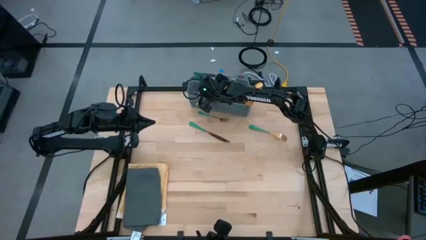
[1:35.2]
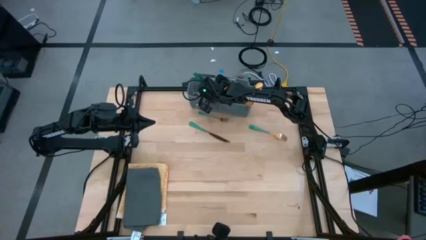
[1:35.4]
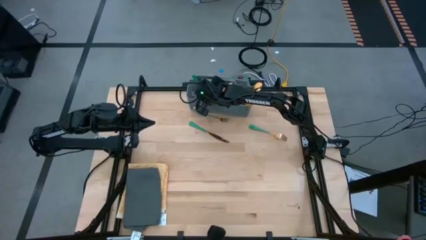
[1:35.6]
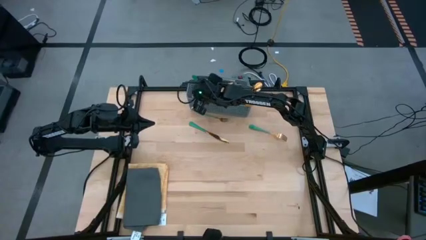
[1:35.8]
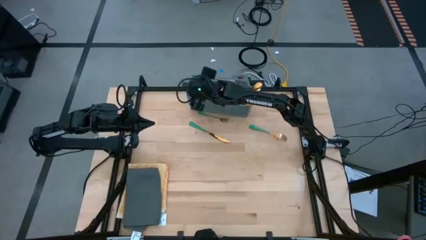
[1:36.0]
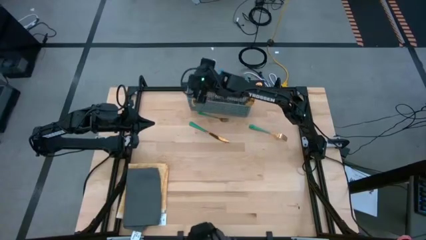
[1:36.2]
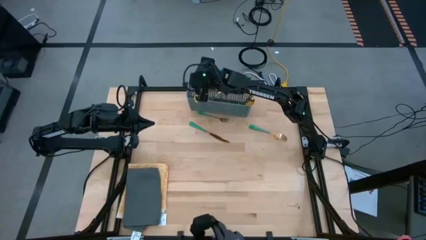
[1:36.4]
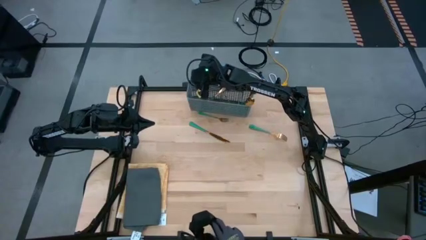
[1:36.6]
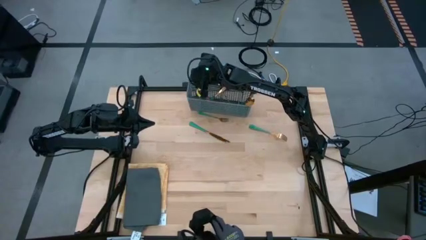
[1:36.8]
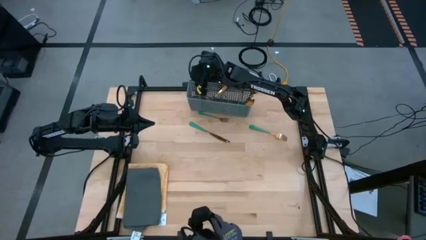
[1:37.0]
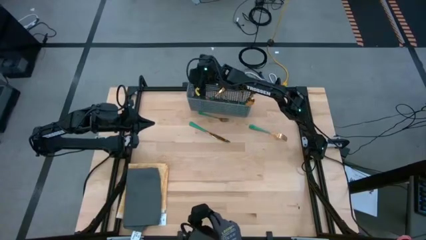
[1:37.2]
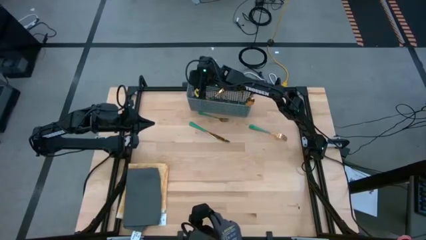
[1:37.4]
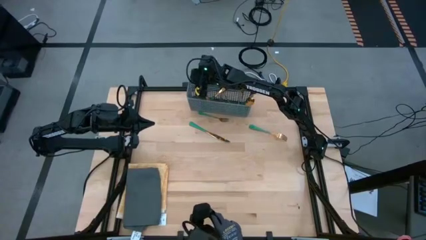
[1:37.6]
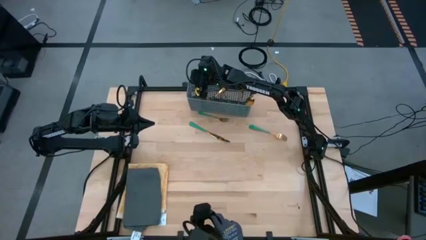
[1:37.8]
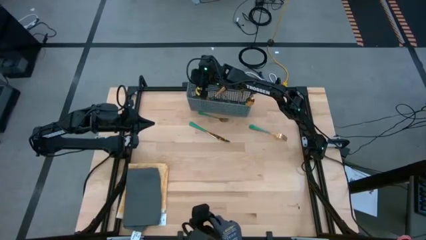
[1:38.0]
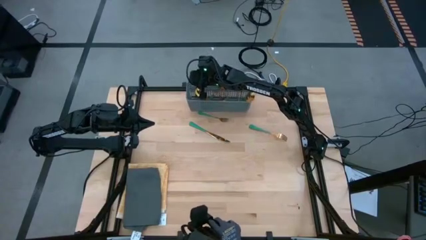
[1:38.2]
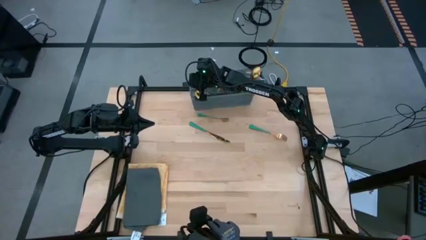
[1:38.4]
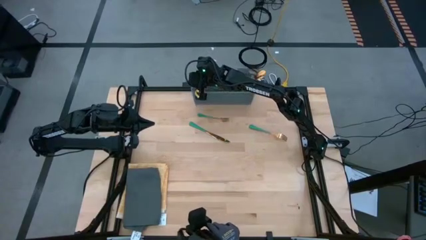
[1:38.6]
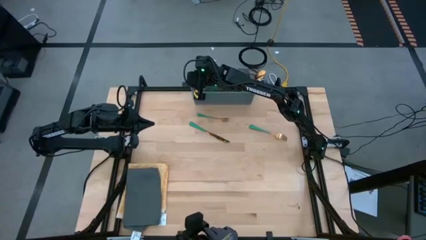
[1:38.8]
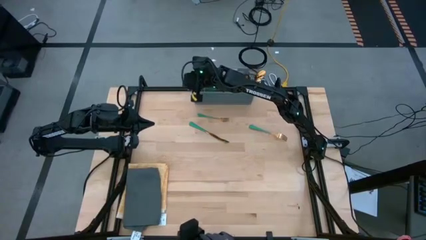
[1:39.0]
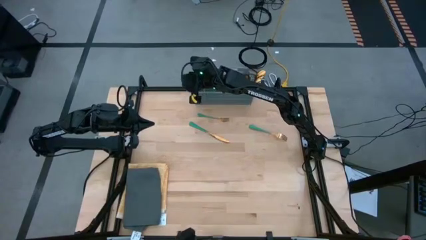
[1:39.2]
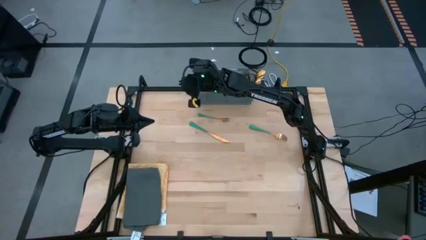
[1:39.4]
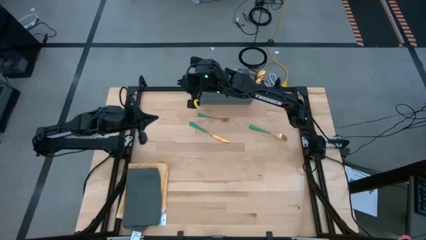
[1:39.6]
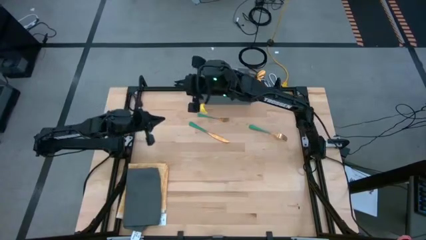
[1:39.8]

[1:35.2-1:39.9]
Task: Sort silverware
Remove the green knife from the dishwasher utensil holder

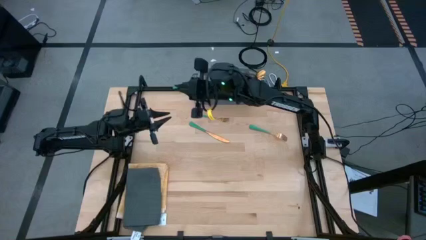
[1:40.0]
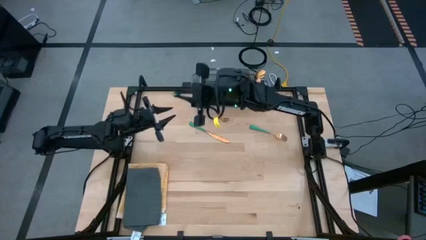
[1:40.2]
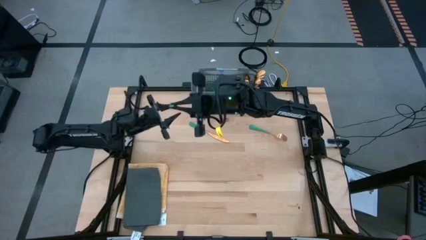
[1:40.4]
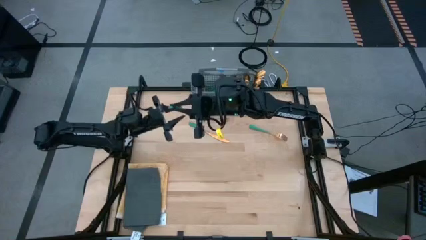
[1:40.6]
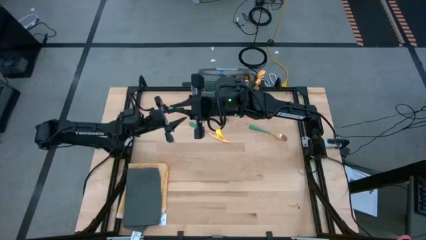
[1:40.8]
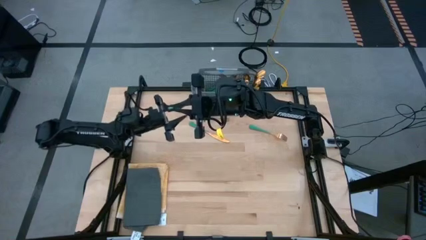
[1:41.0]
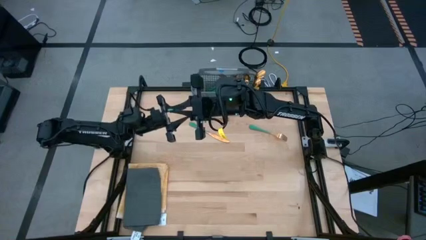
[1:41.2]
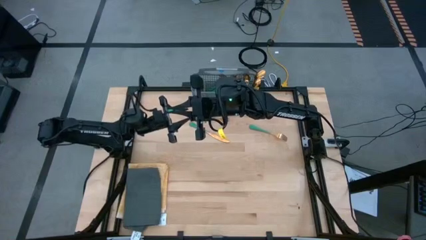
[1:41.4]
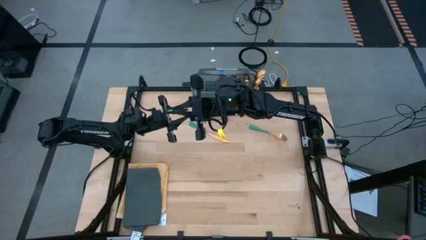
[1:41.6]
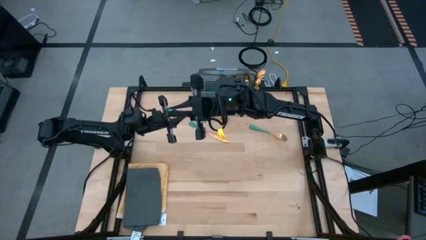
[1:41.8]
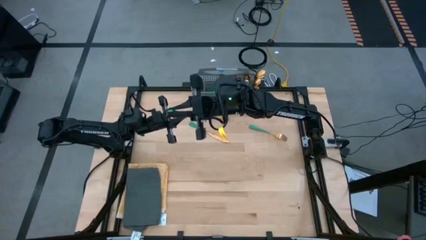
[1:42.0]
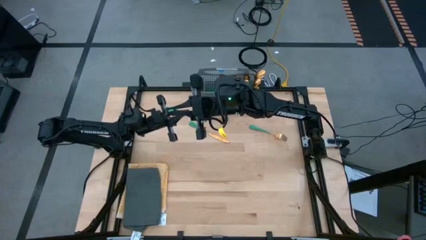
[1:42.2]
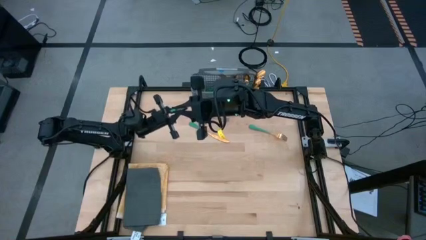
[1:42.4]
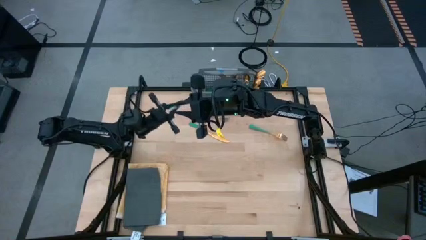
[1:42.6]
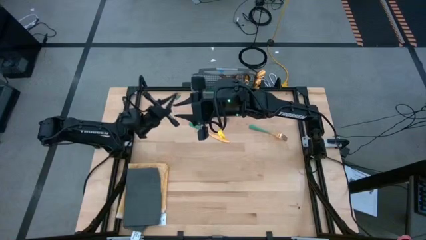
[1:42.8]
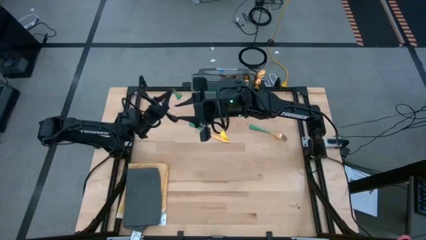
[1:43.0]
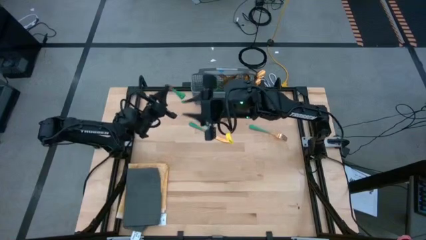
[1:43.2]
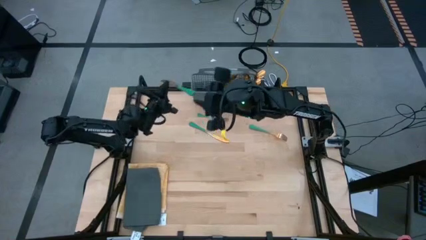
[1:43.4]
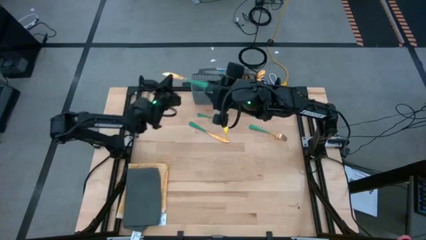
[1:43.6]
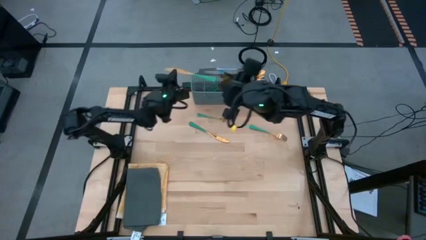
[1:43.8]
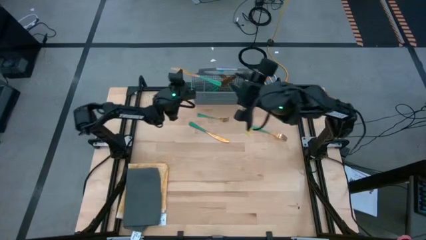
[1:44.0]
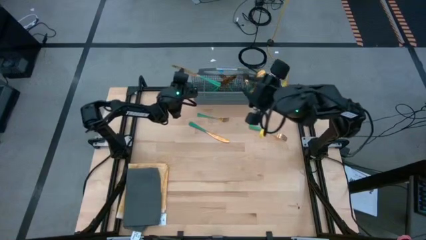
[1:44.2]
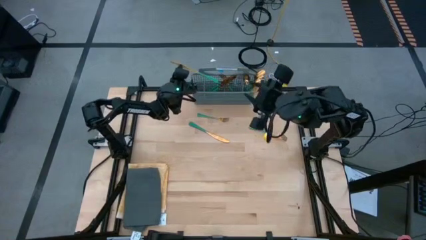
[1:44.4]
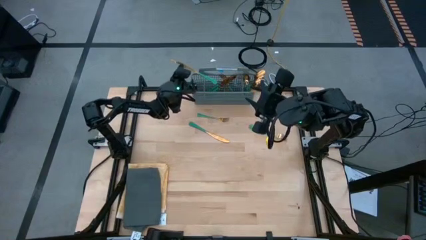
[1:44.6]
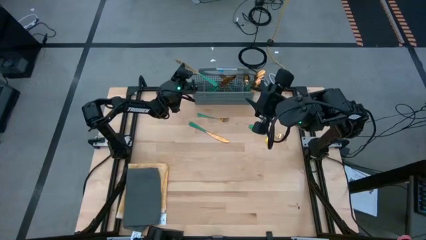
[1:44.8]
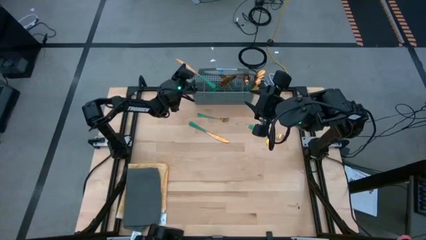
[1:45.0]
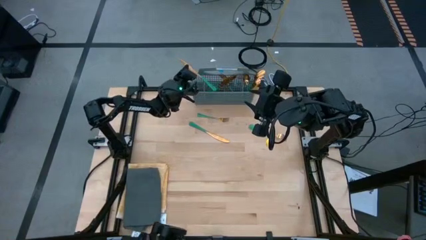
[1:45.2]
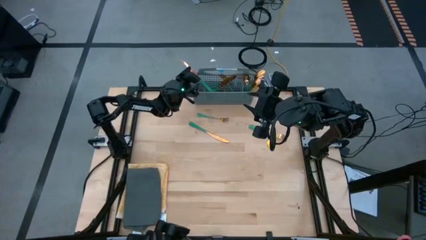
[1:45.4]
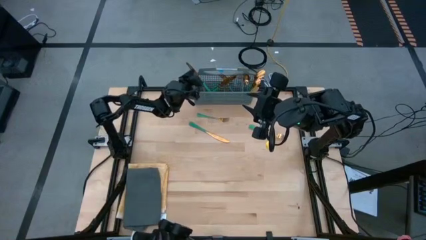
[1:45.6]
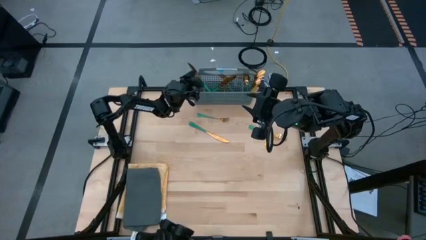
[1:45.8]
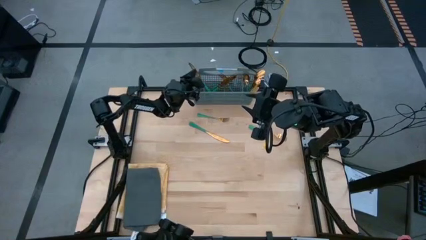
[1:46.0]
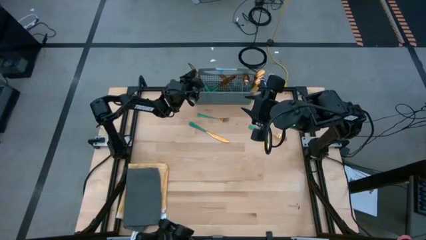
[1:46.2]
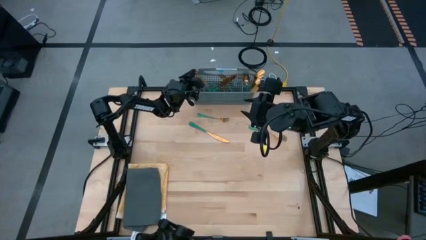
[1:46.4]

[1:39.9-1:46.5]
Put the green knife into the dishwasher utensil holder
